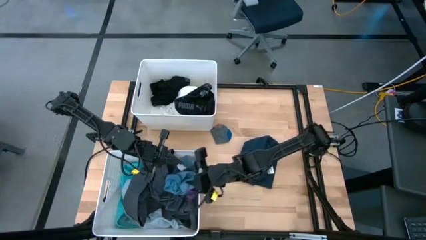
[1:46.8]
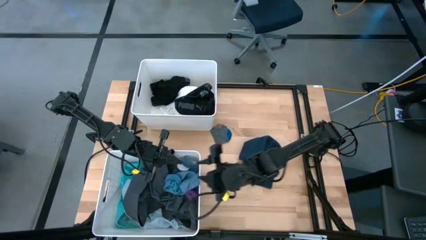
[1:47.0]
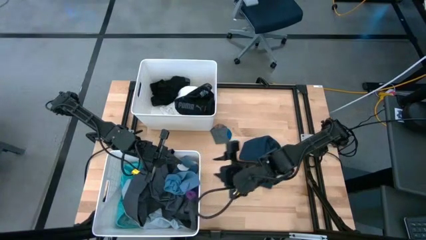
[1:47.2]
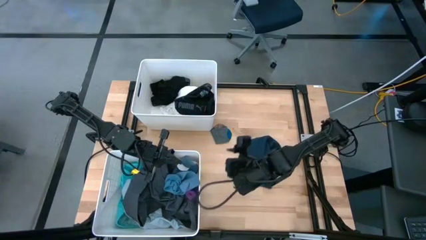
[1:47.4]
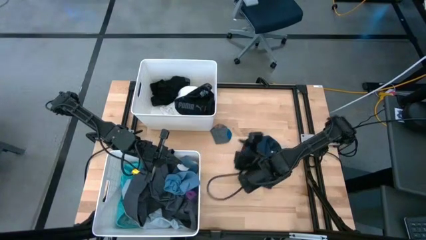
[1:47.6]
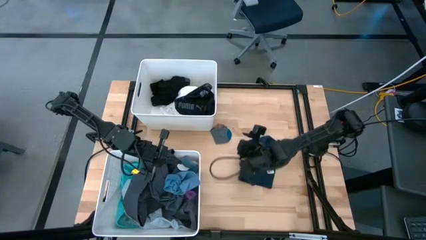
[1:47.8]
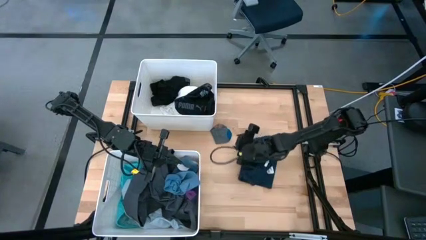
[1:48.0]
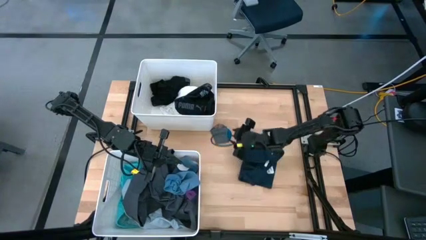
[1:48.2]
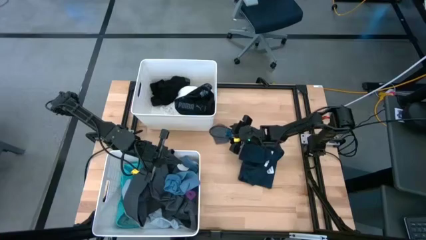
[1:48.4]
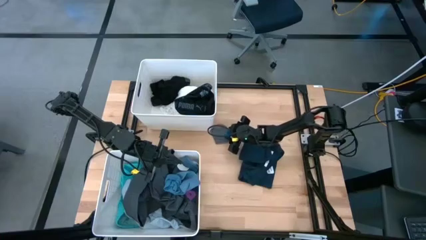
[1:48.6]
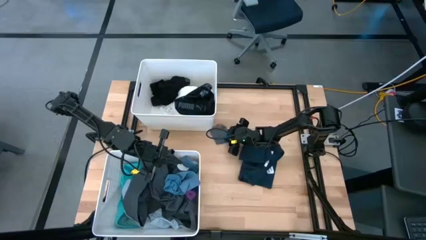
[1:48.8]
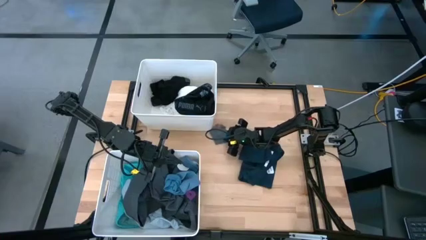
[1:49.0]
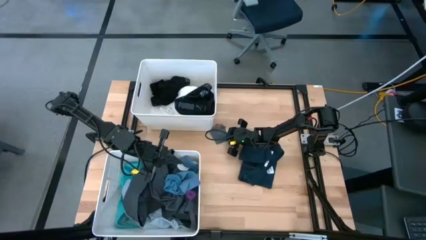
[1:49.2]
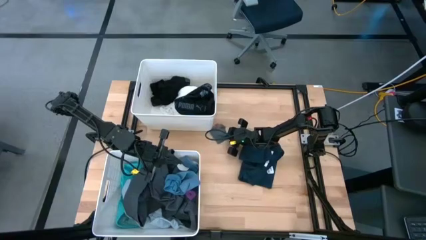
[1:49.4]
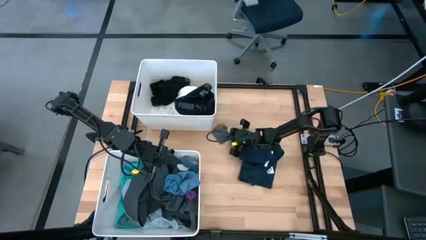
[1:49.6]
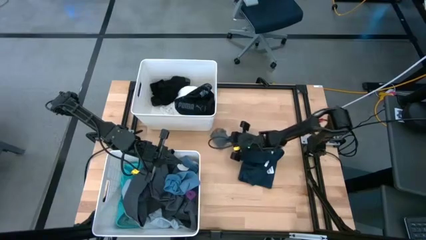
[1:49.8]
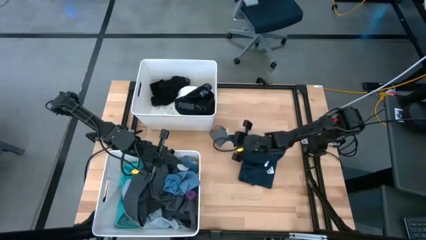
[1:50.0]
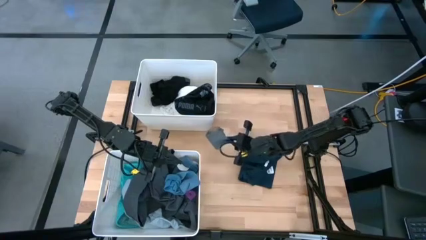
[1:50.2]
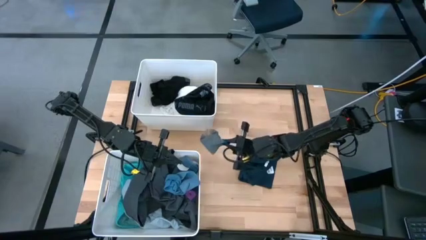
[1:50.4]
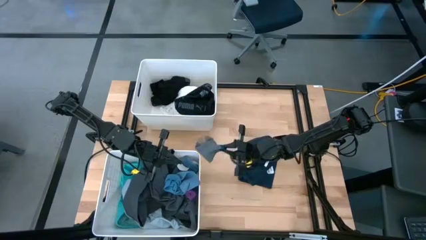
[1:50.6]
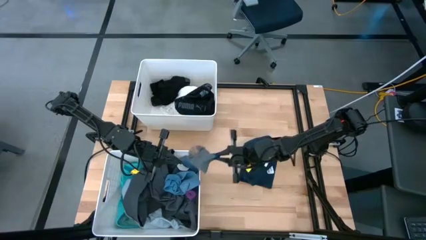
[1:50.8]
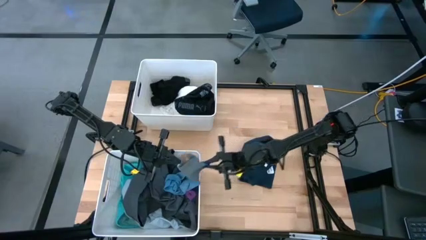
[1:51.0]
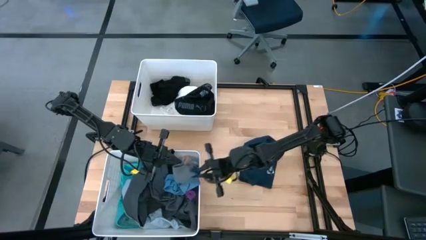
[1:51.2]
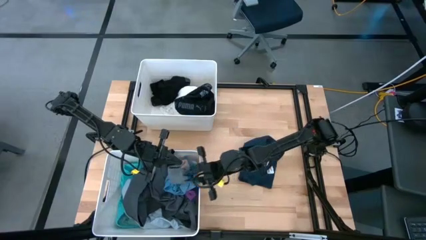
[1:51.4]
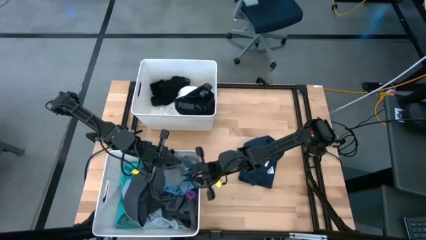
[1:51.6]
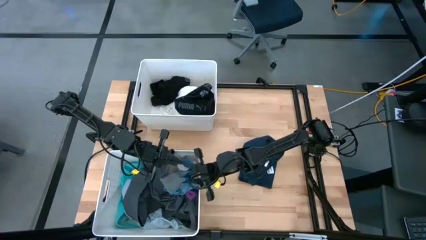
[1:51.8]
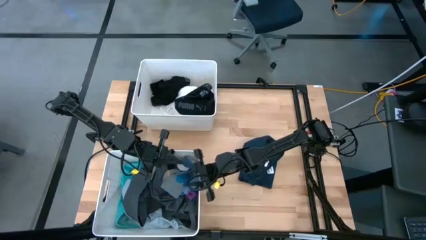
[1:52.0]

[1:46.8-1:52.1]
Task: Sort clothes
Put the gray sock into the bottom laundry organizer

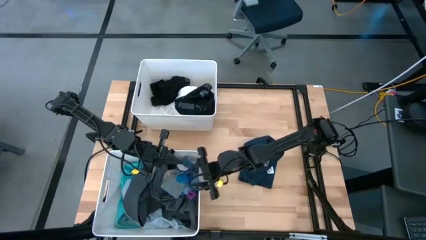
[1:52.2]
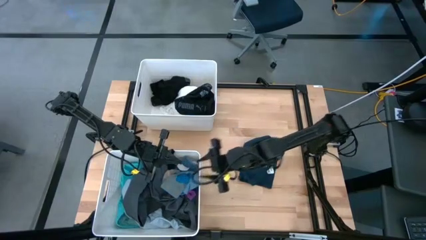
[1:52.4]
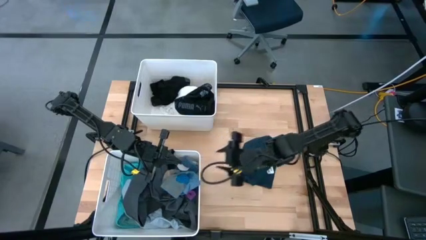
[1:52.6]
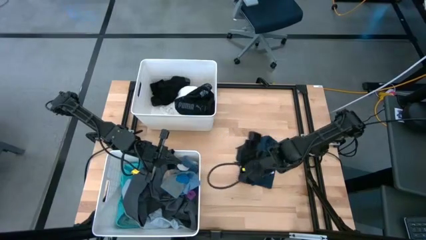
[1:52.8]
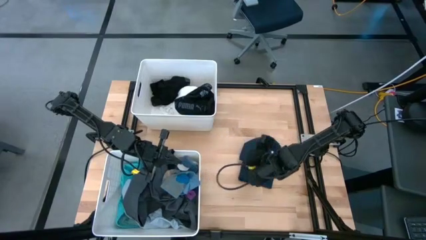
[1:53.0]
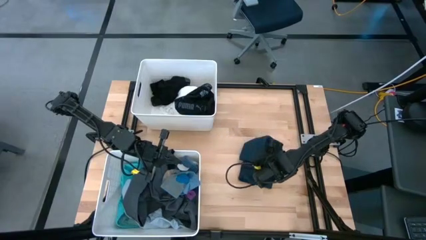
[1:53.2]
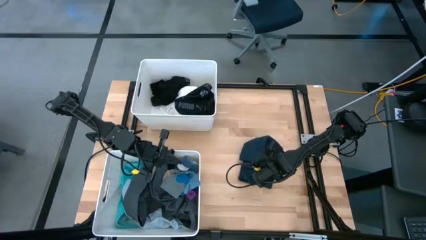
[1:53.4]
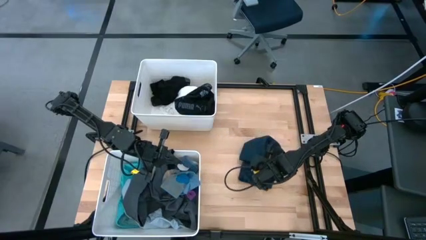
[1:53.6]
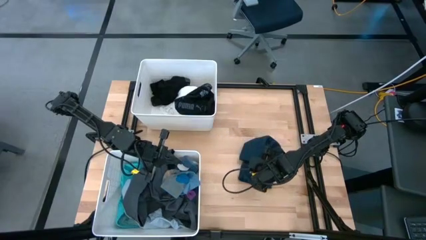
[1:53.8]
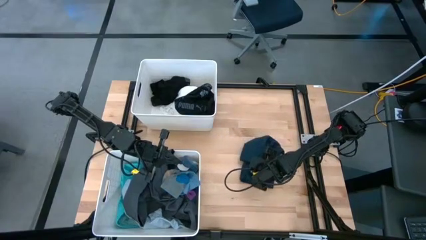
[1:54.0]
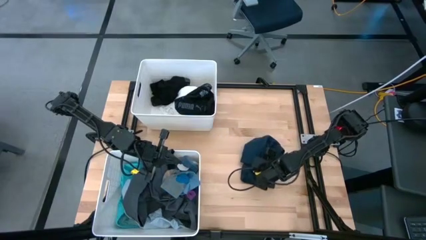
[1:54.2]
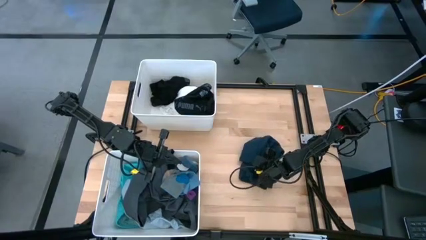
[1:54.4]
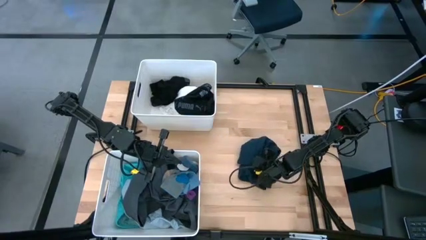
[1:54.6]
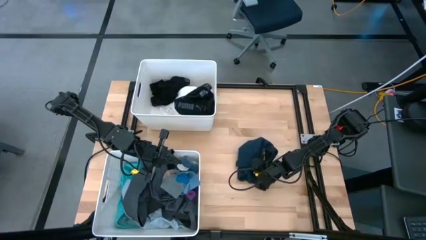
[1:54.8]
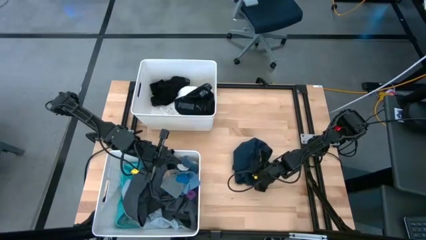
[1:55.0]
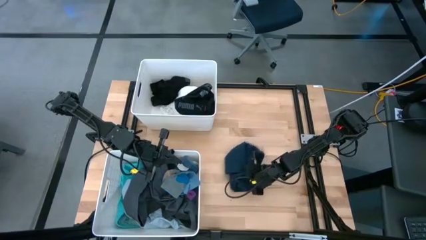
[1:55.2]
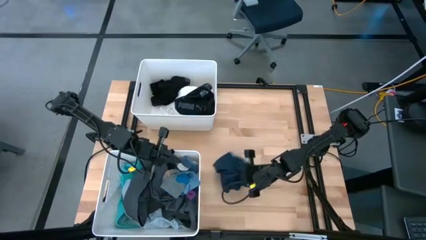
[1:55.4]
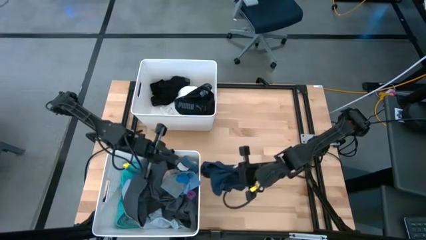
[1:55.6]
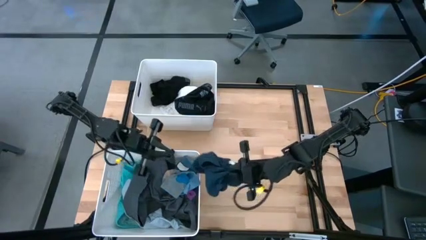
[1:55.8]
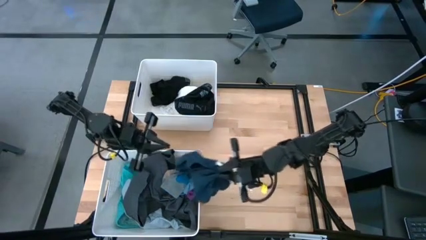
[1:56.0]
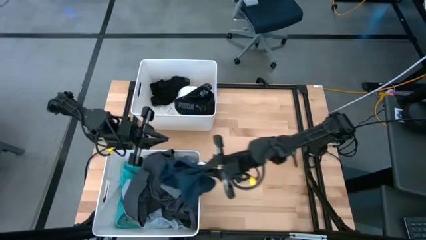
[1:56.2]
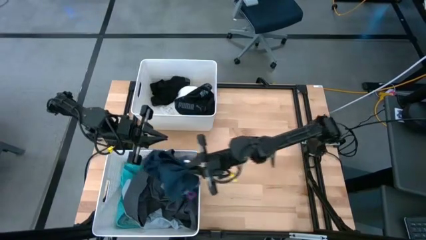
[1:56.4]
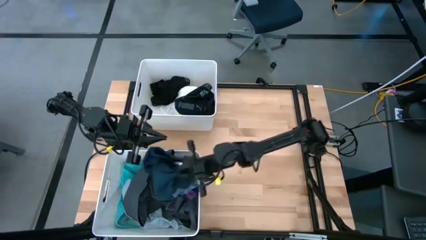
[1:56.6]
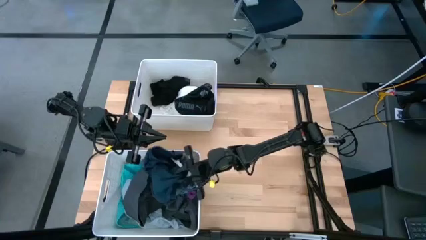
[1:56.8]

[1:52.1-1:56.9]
Put the dark blue short into the top laundry organizer

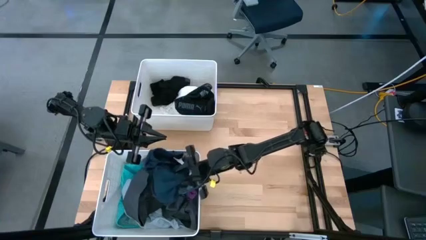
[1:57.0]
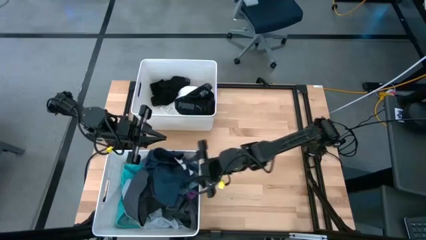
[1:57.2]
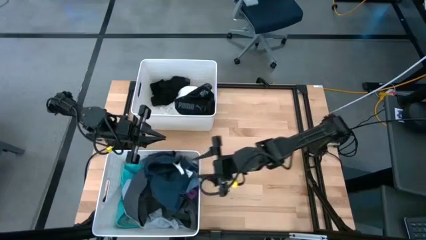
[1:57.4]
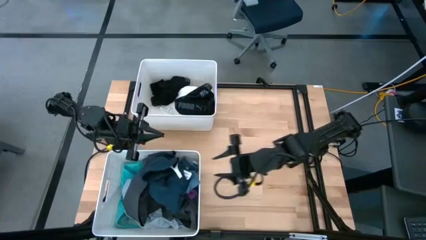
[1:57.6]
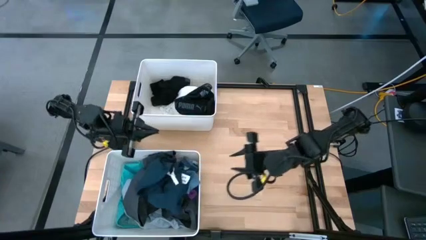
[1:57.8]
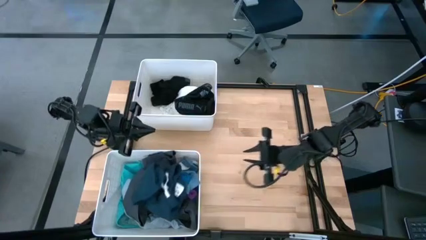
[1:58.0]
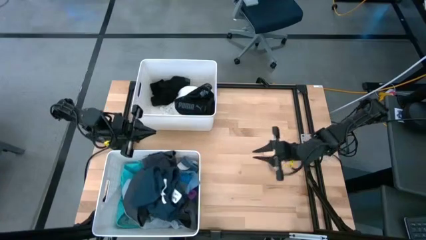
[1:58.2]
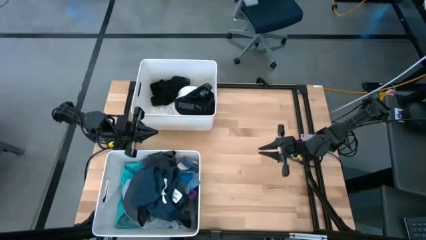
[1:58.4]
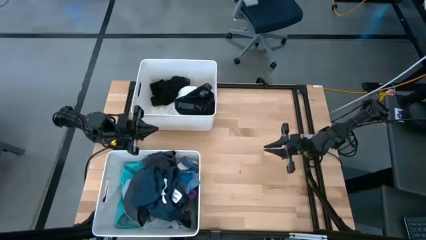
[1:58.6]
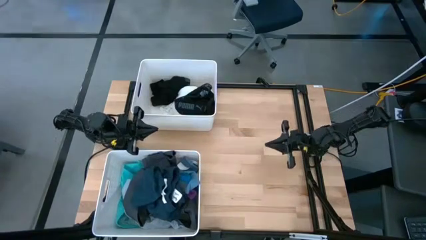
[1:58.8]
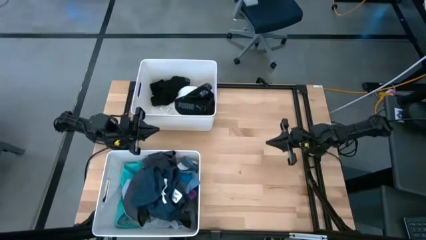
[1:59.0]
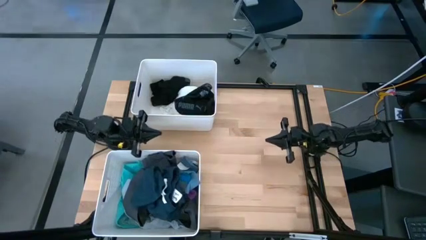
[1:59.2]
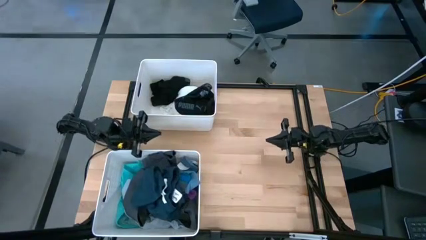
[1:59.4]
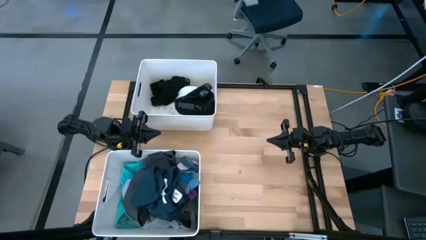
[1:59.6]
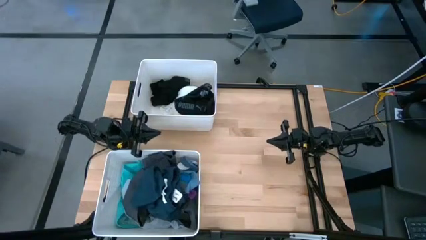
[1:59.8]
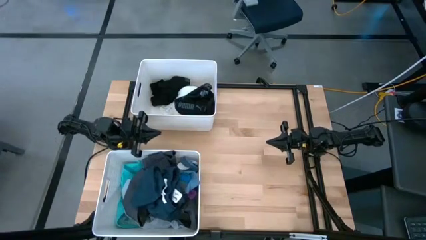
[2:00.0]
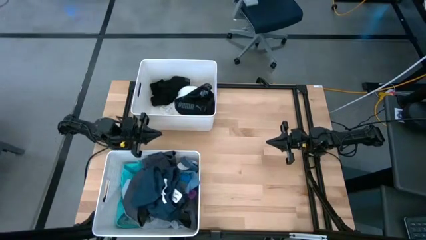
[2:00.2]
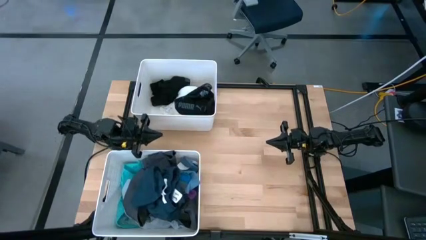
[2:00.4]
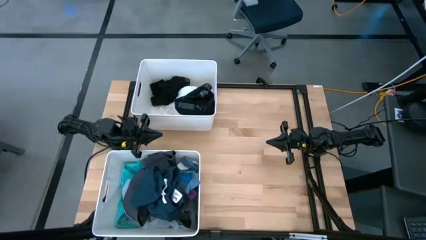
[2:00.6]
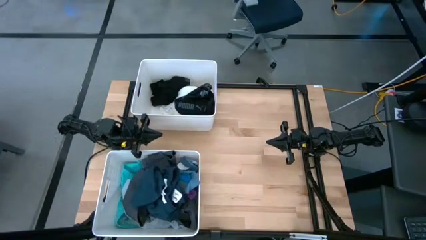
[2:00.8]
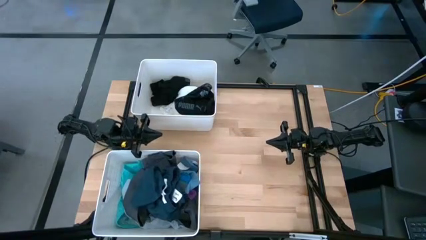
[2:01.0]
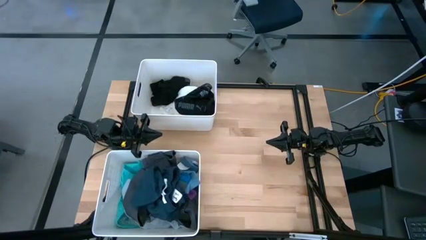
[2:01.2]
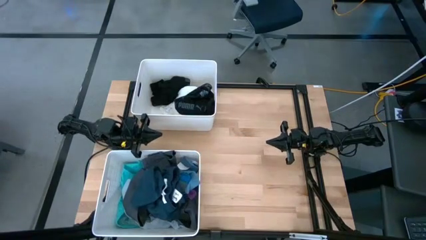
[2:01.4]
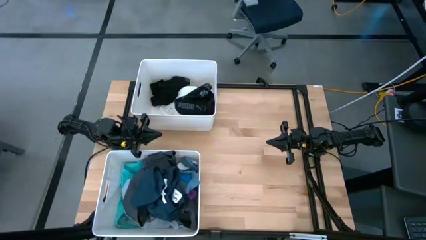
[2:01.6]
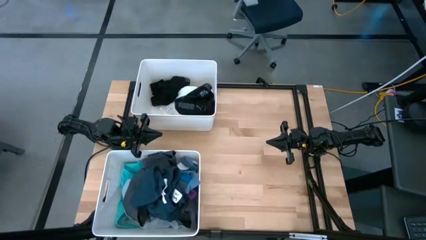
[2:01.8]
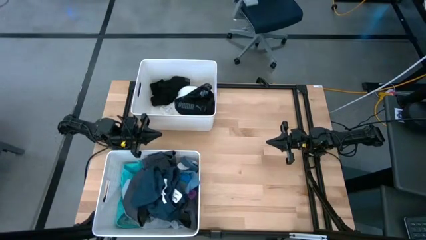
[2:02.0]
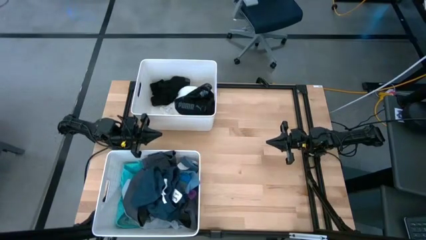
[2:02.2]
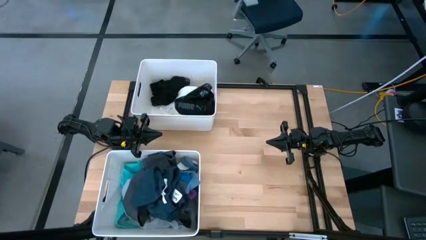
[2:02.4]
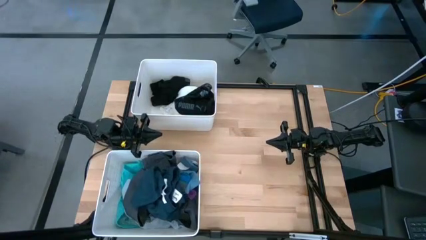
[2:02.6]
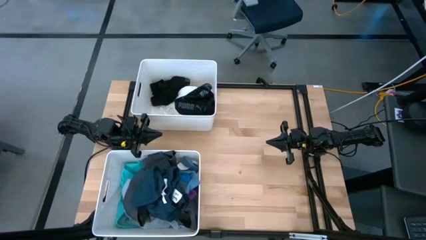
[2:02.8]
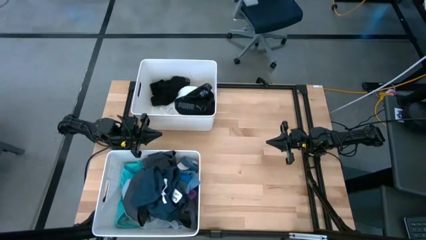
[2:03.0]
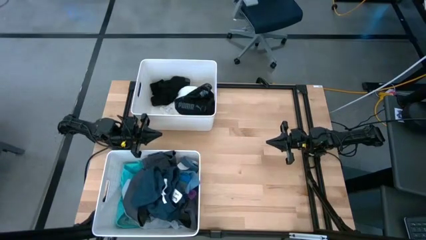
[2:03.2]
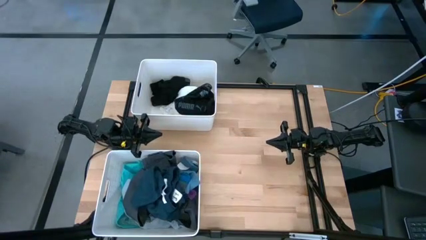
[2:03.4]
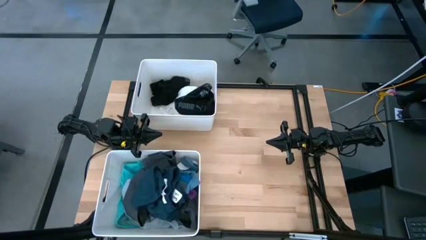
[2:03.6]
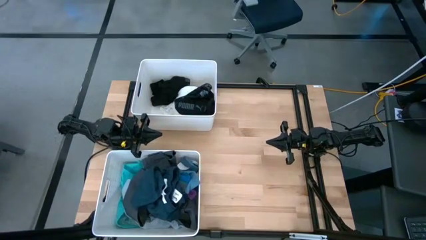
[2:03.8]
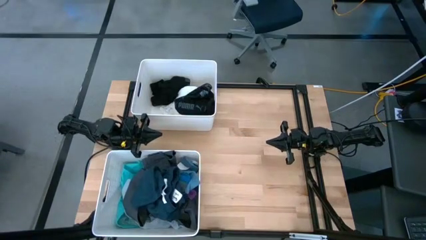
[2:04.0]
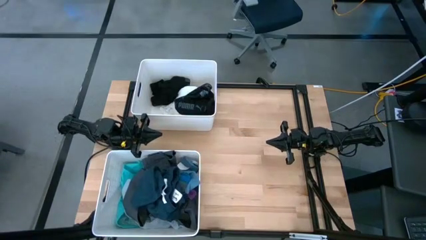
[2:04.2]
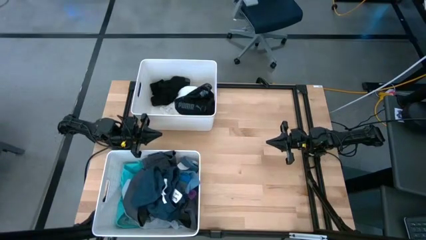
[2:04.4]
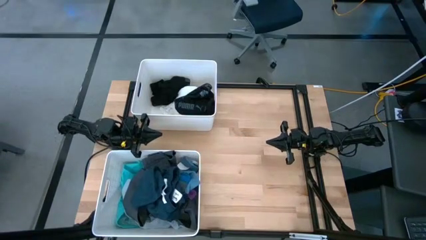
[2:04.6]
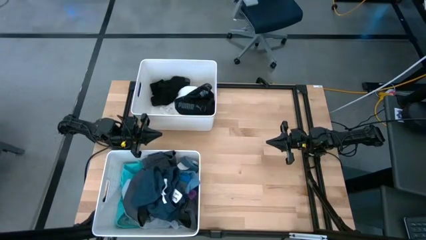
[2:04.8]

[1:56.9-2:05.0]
Return to Home Position
